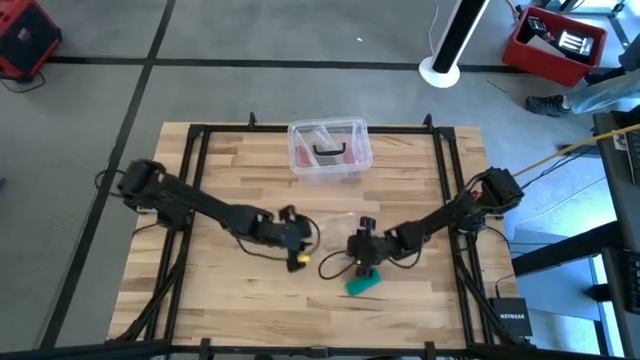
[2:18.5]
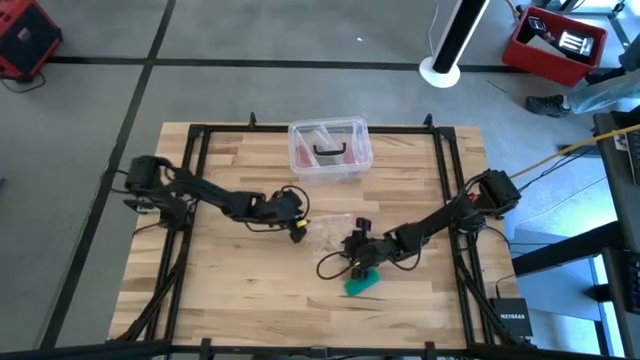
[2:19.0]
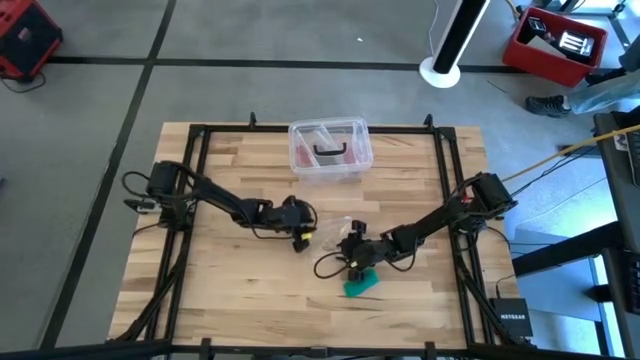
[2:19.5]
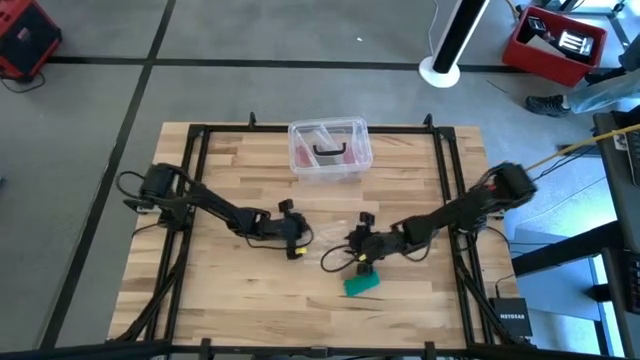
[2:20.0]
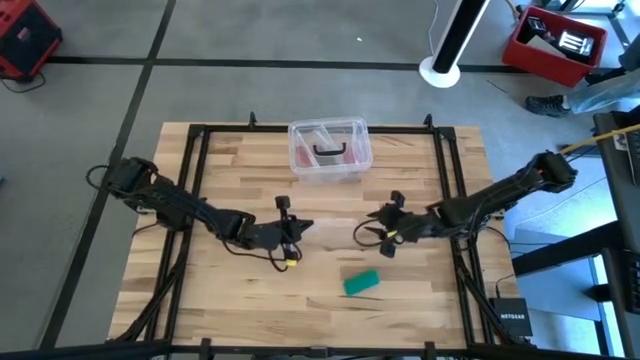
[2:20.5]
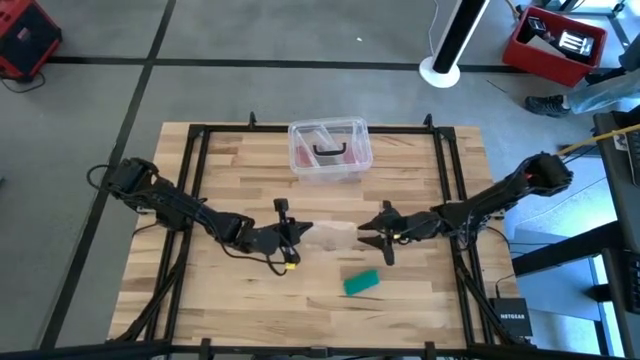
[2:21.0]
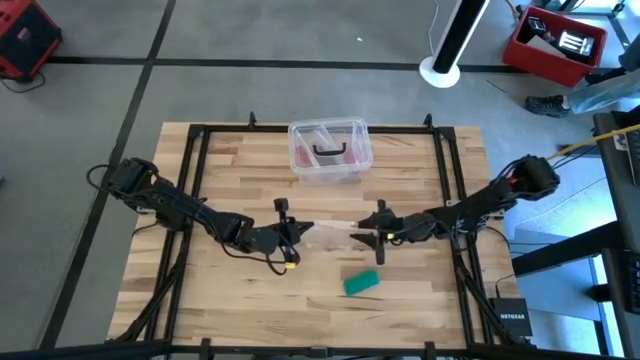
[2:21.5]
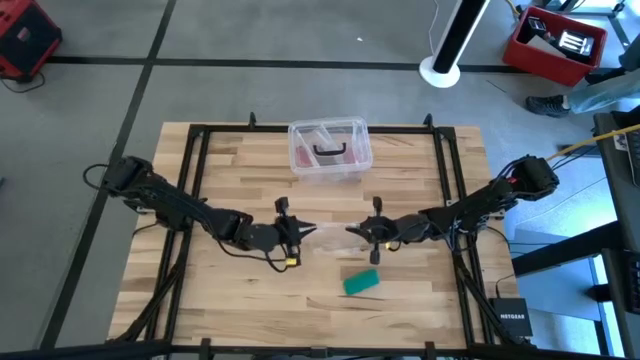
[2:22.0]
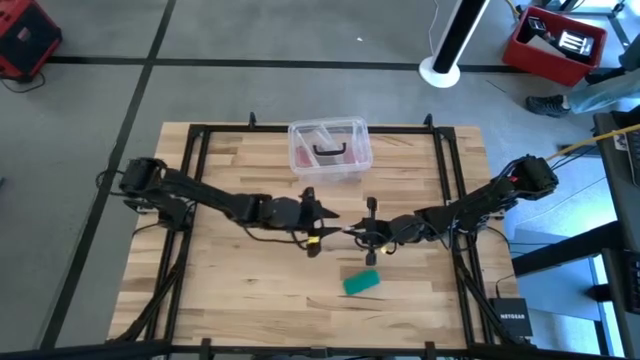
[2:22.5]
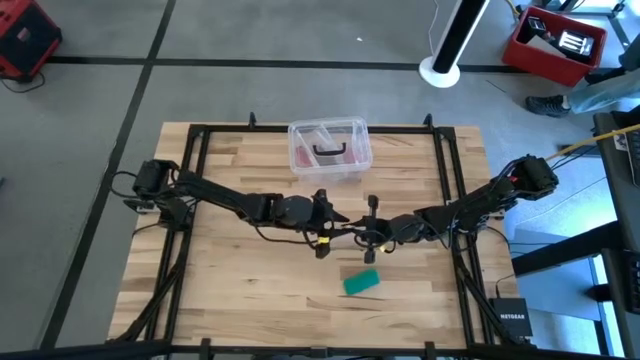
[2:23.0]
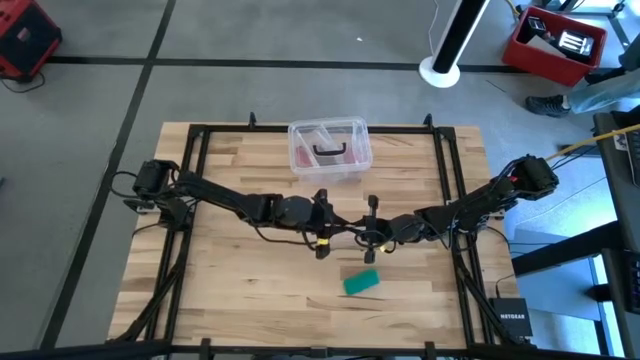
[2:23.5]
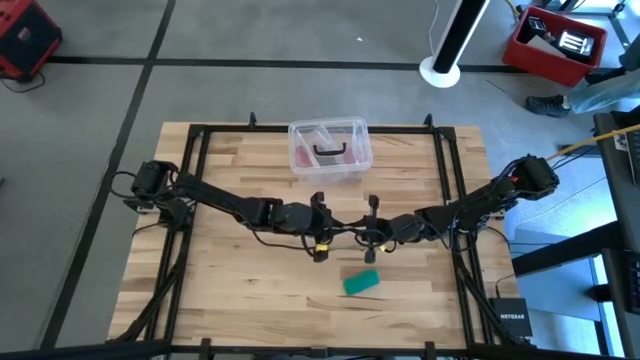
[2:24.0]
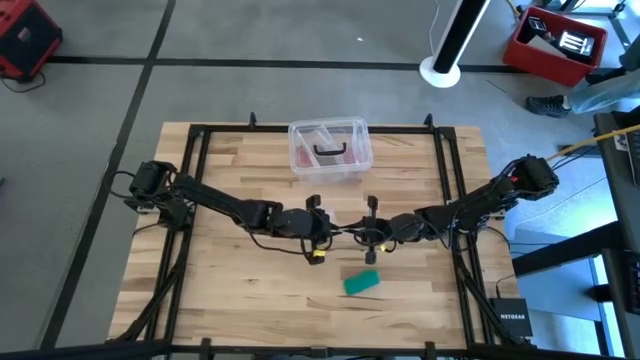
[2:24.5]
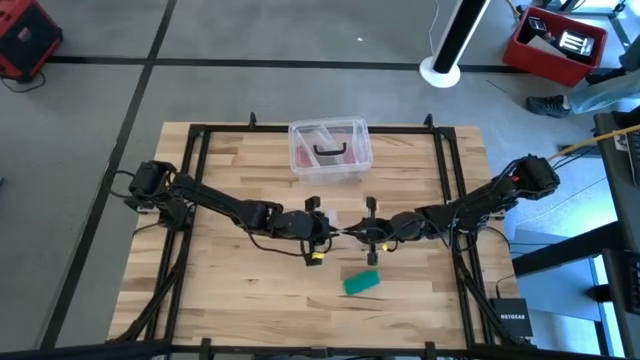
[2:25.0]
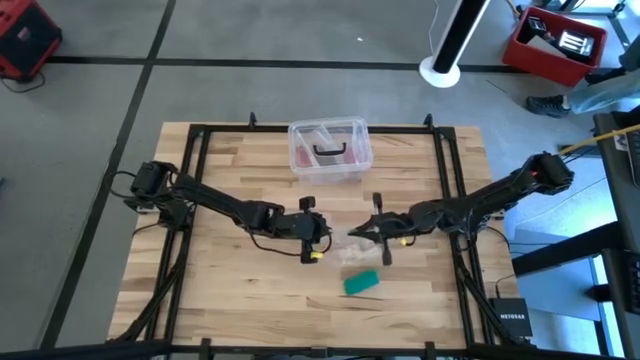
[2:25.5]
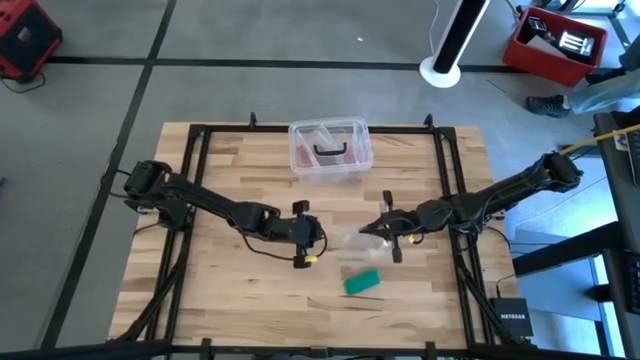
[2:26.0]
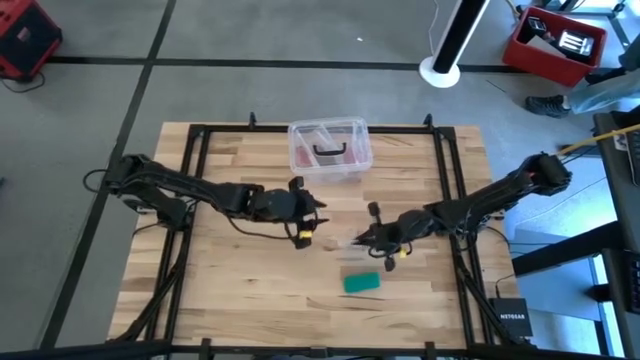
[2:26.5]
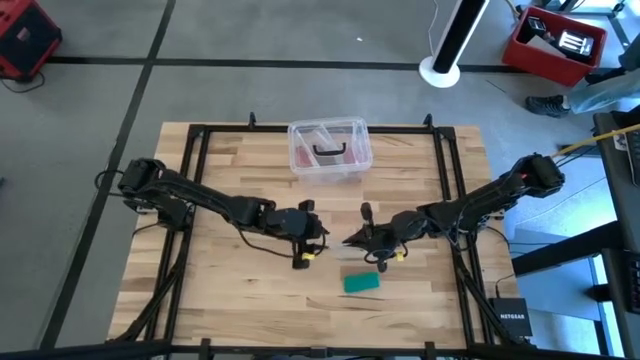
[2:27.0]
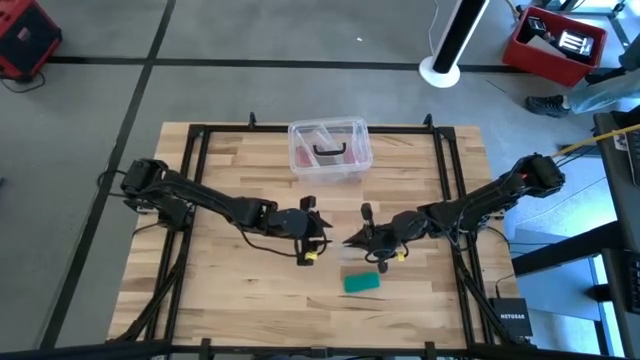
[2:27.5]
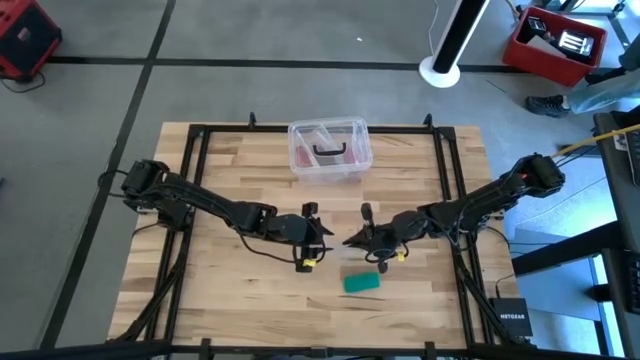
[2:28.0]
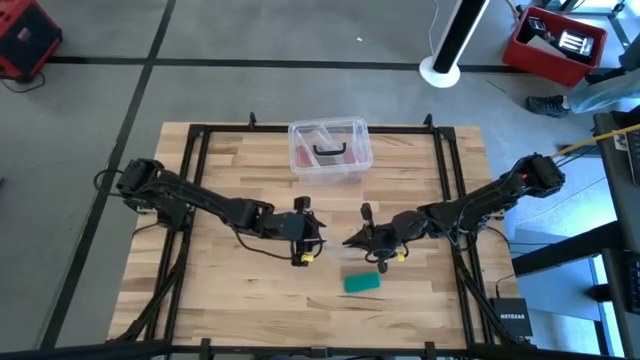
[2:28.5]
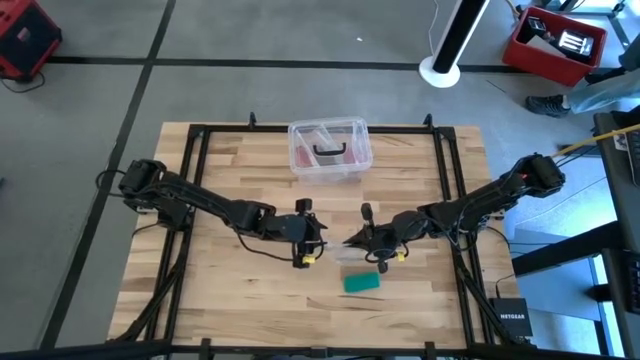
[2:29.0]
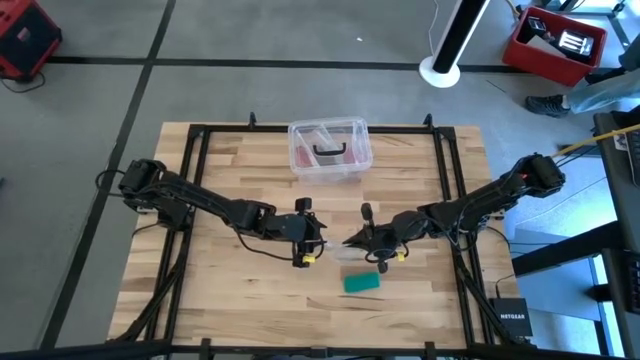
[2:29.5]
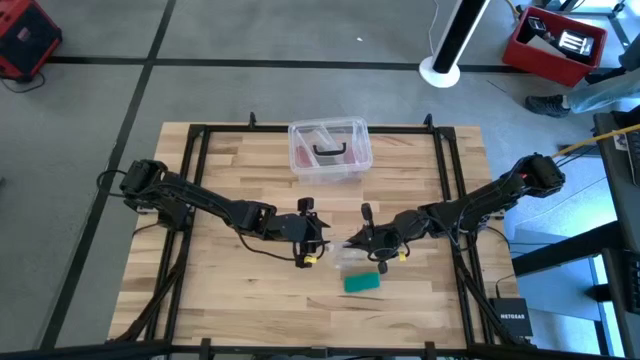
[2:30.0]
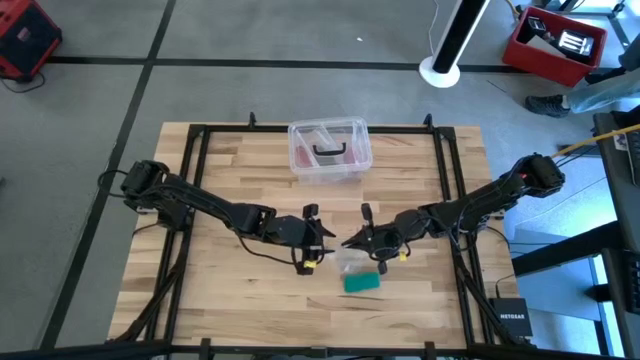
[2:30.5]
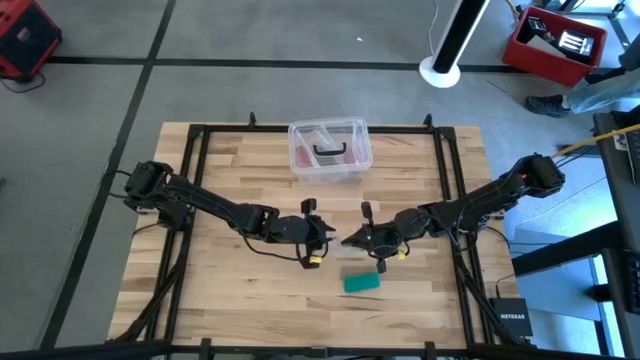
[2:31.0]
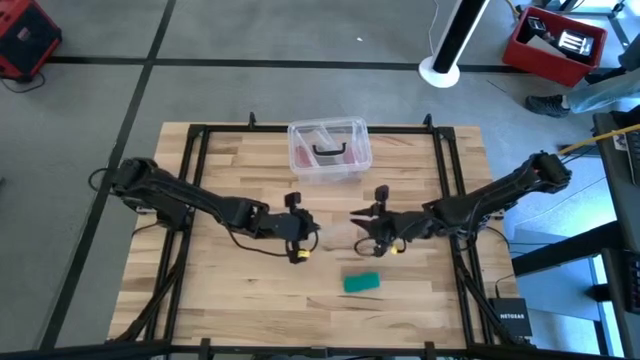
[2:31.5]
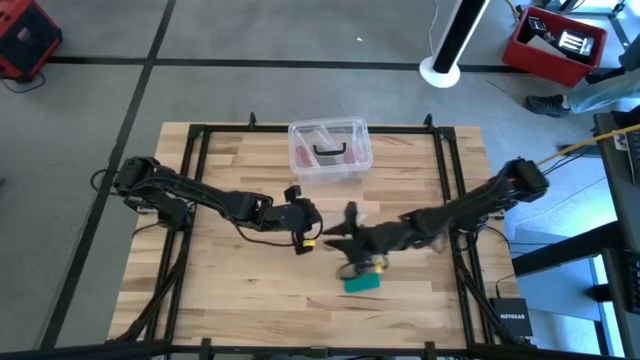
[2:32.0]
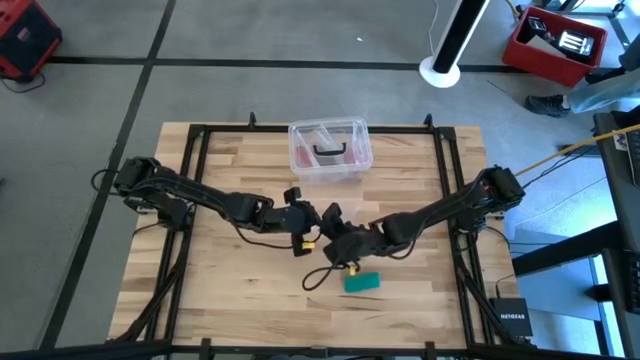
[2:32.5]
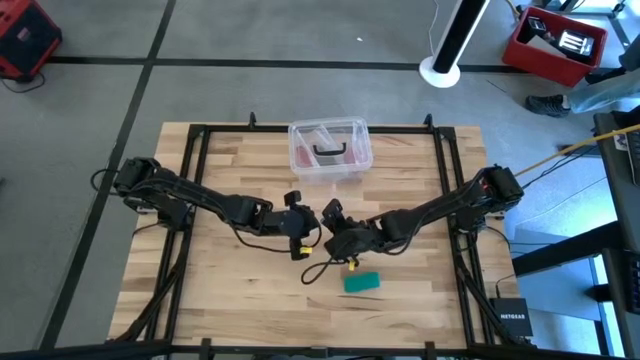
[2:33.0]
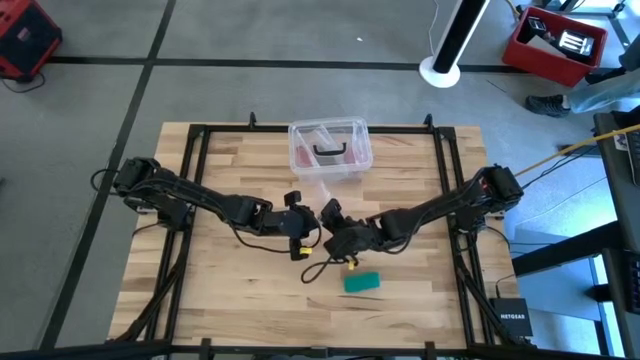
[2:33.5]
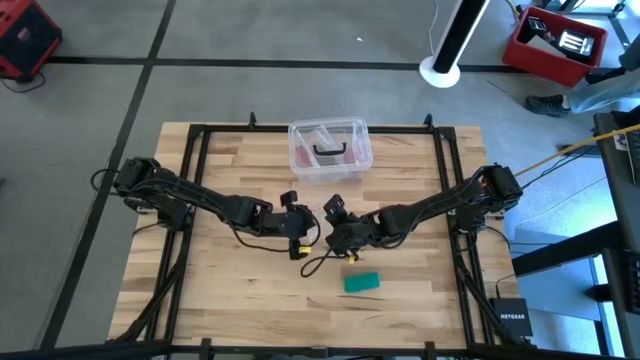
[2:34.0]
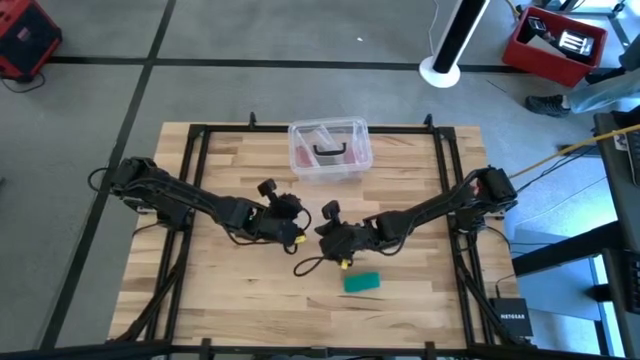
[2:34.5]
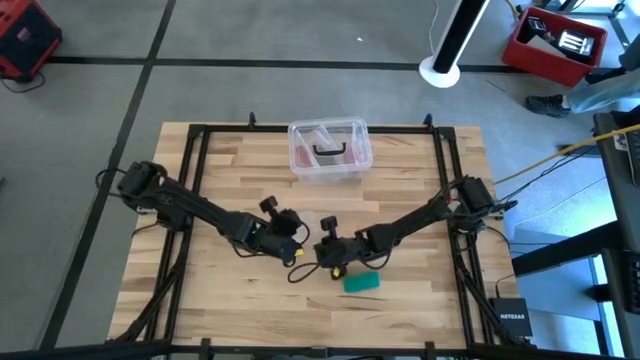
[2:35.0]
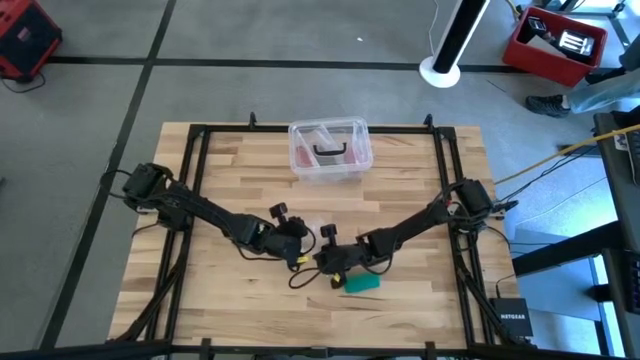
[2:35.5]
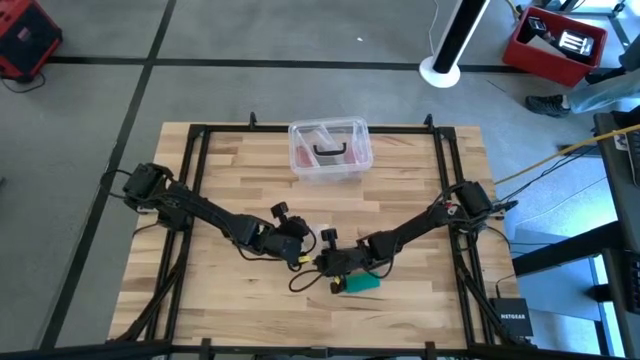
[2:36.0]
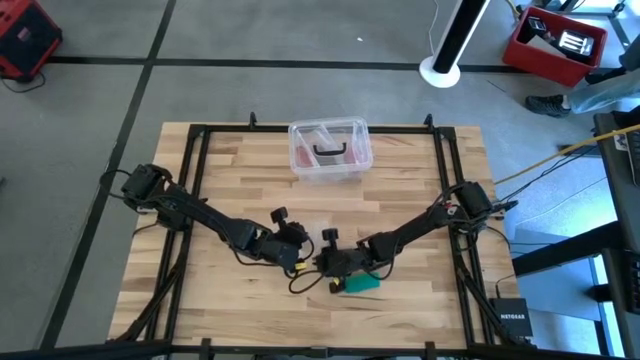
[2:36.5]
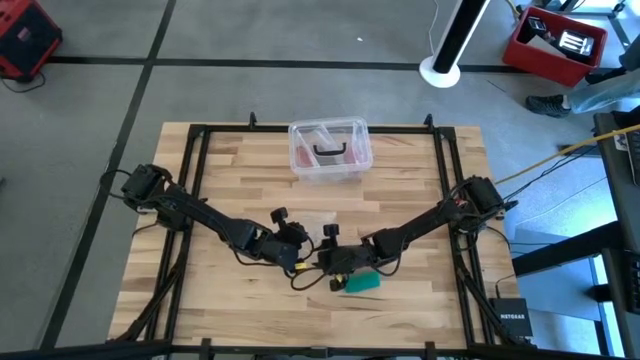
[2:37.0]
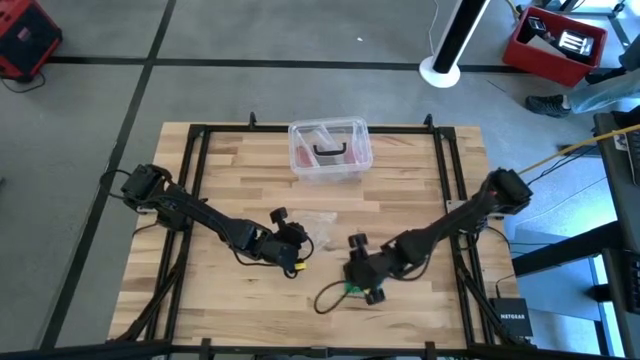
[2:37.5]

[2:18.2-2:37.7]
Task: Roll bandage
Open the transparent zip lock bag

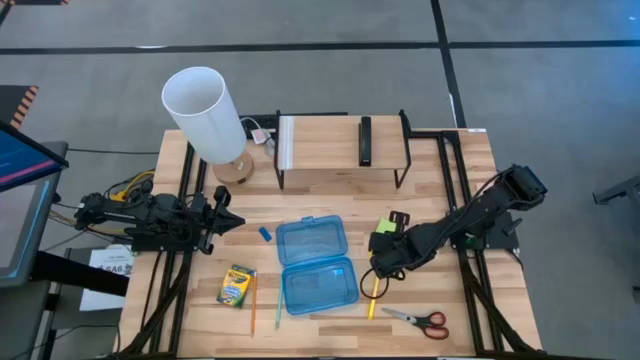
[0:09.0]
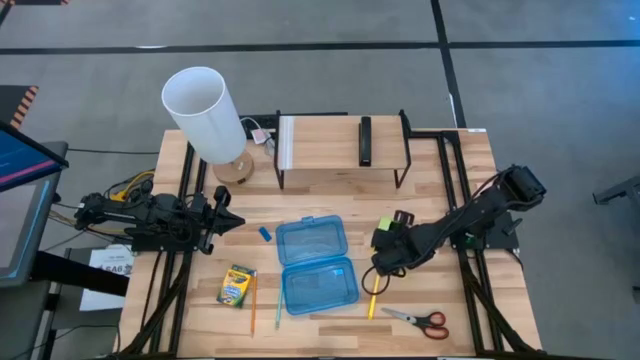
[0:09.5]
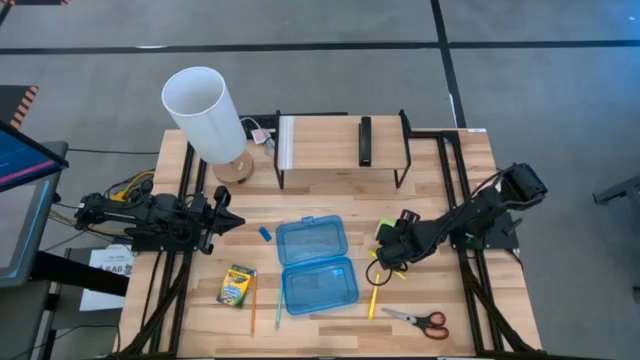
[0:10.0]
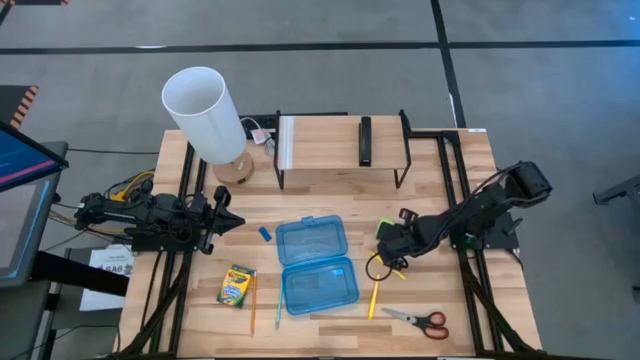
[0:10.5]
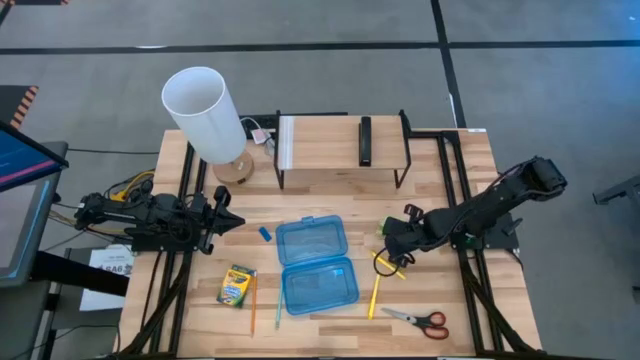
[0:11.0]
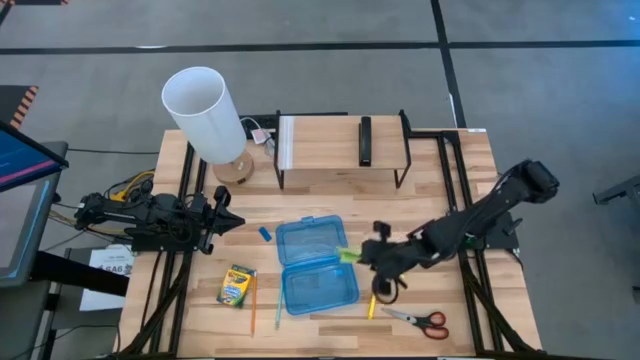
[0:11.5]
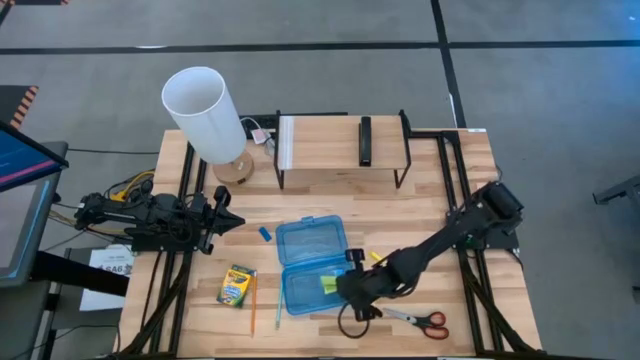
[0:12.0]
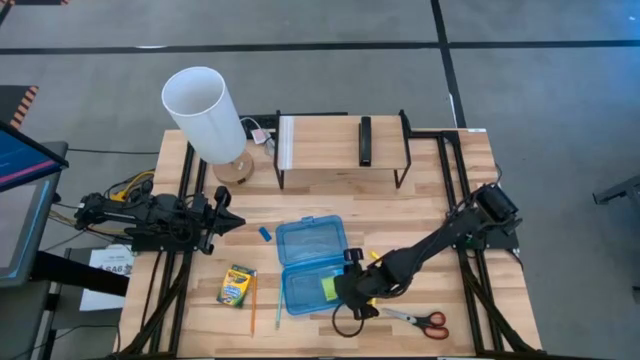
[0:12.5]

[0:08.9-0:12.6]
Task: Pack school essentials
Put the sticky notes into the blue supply box
